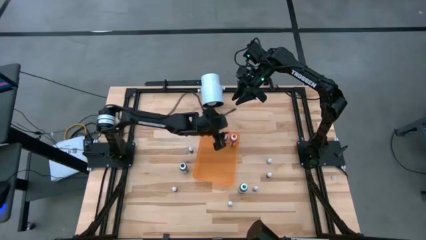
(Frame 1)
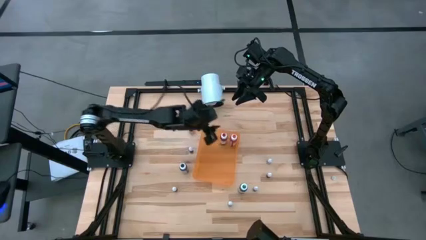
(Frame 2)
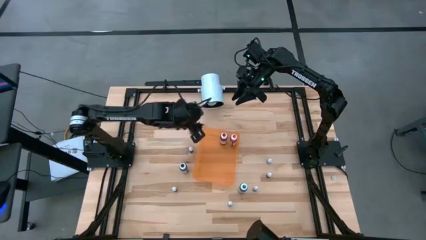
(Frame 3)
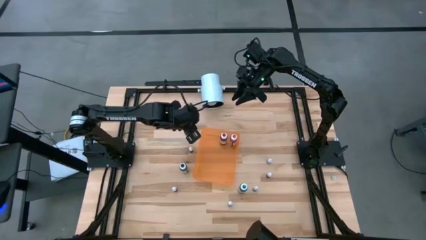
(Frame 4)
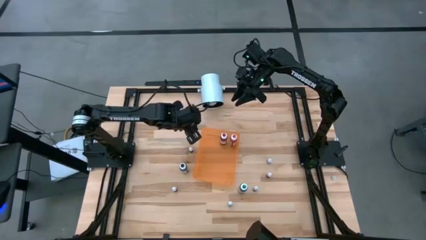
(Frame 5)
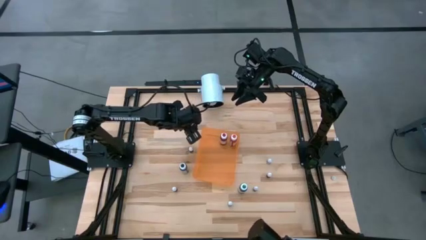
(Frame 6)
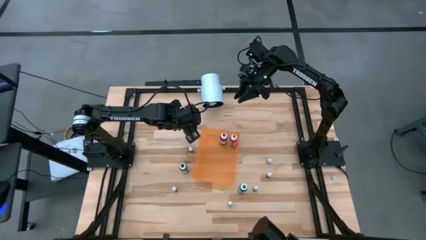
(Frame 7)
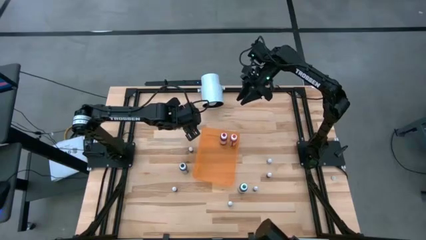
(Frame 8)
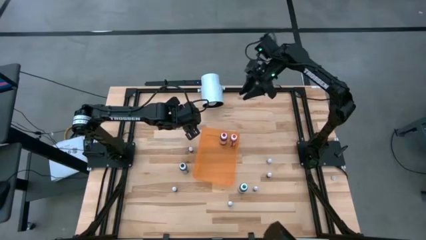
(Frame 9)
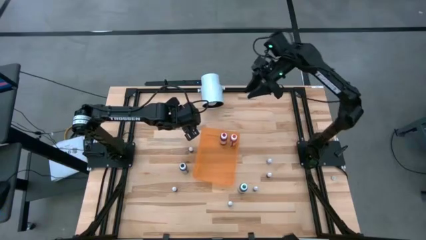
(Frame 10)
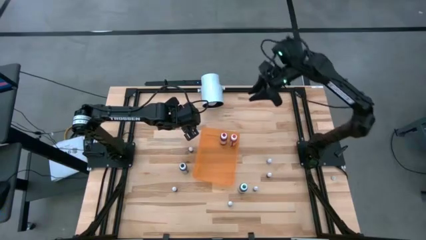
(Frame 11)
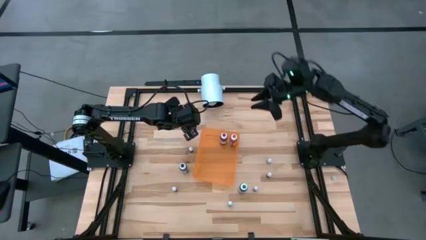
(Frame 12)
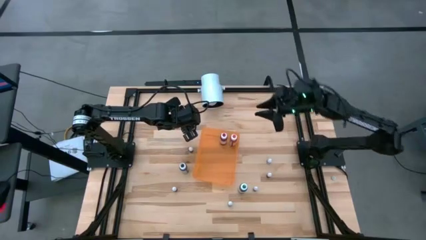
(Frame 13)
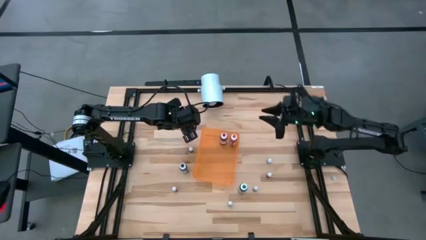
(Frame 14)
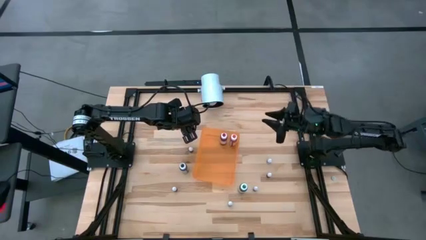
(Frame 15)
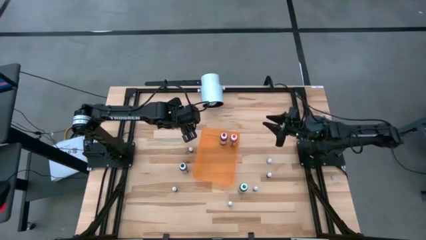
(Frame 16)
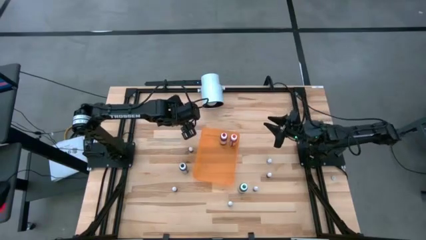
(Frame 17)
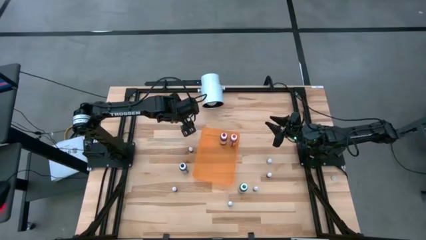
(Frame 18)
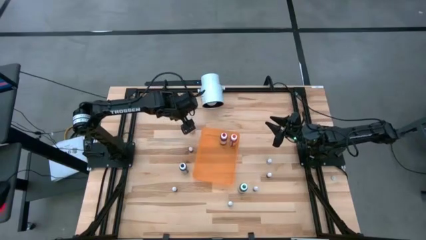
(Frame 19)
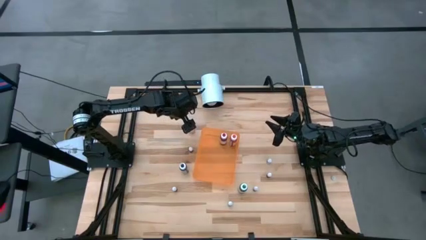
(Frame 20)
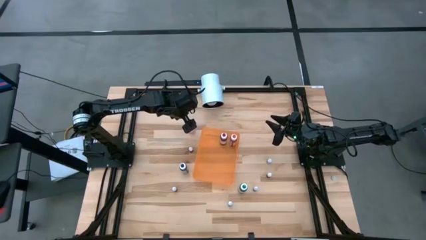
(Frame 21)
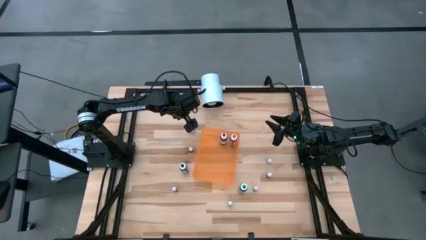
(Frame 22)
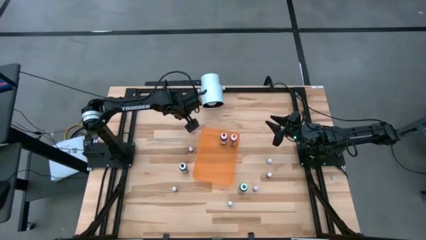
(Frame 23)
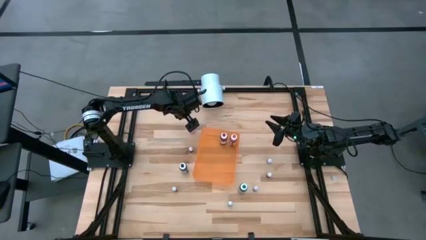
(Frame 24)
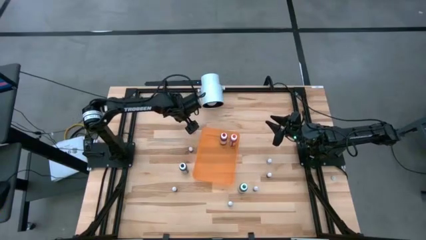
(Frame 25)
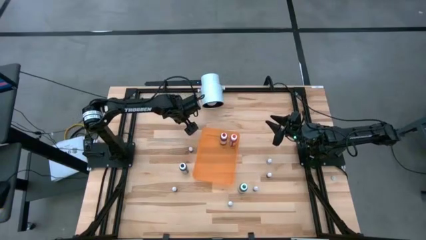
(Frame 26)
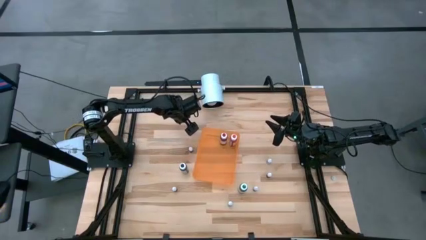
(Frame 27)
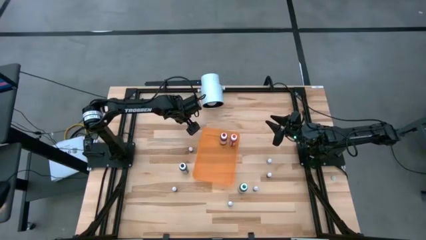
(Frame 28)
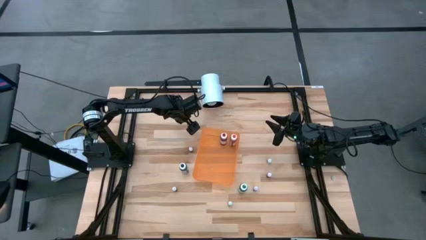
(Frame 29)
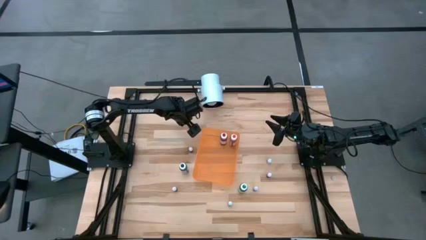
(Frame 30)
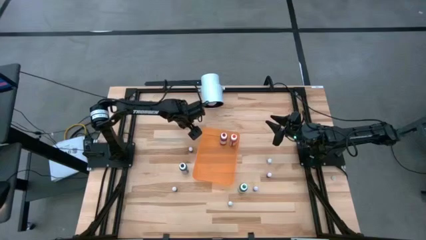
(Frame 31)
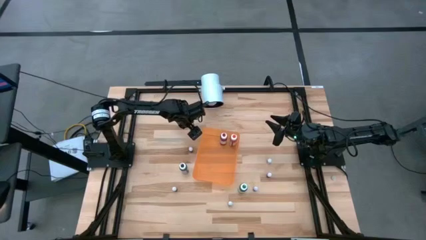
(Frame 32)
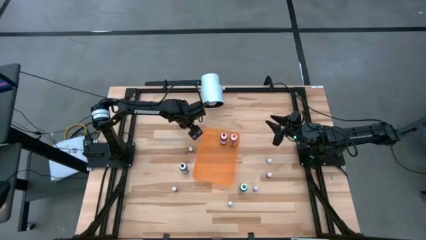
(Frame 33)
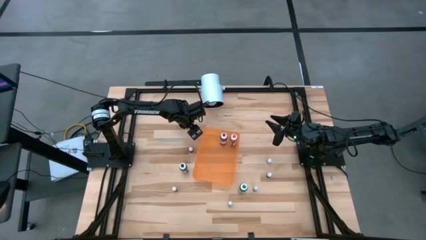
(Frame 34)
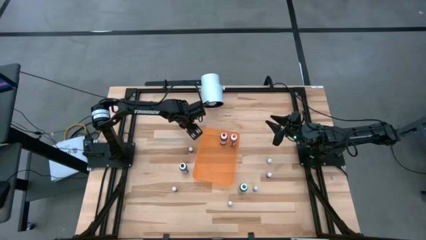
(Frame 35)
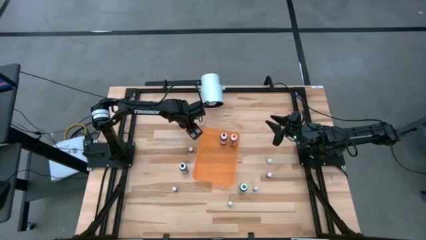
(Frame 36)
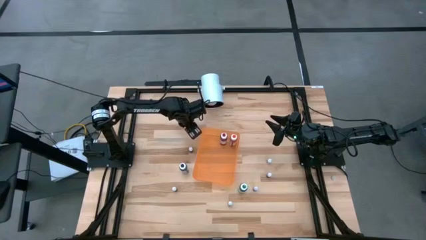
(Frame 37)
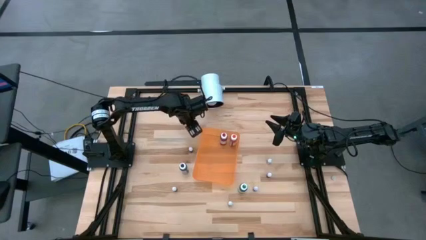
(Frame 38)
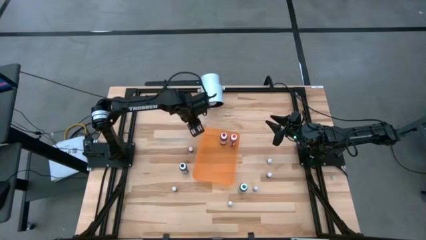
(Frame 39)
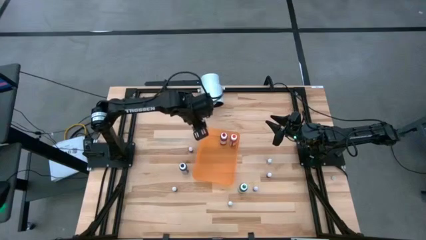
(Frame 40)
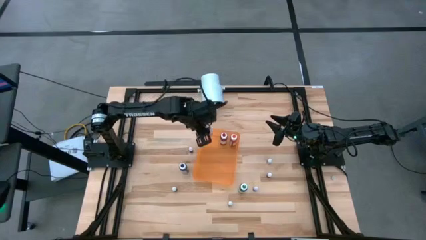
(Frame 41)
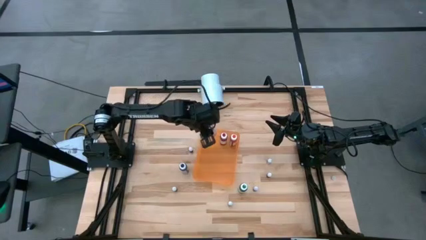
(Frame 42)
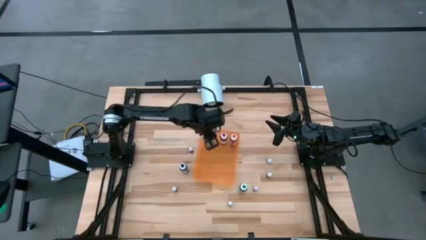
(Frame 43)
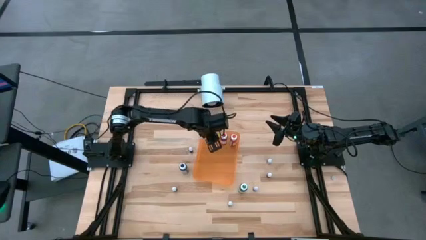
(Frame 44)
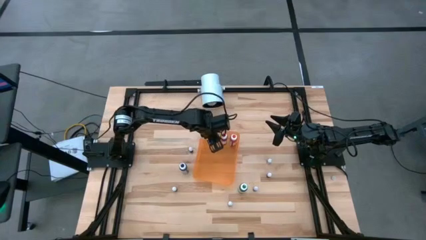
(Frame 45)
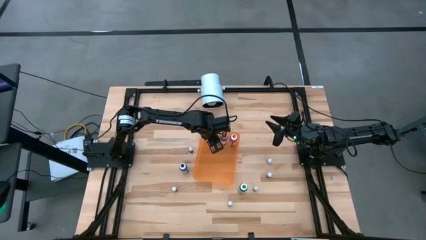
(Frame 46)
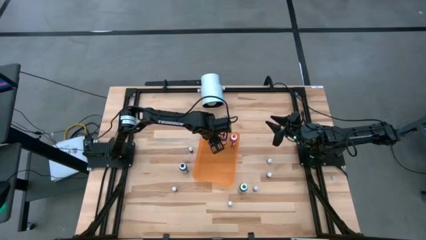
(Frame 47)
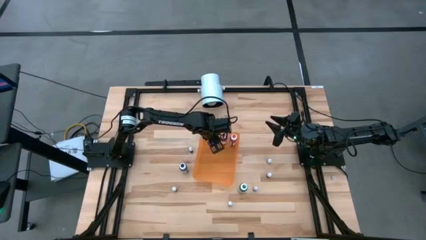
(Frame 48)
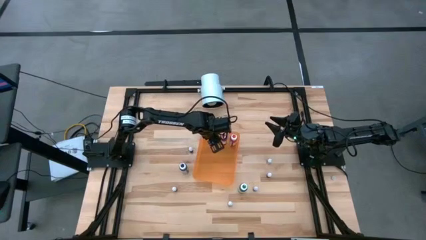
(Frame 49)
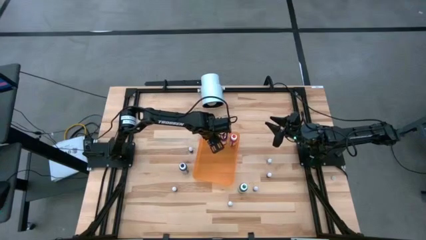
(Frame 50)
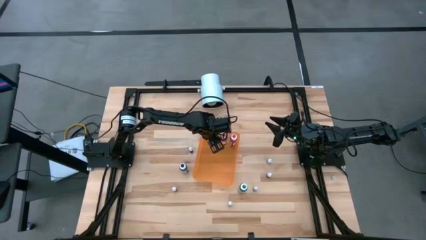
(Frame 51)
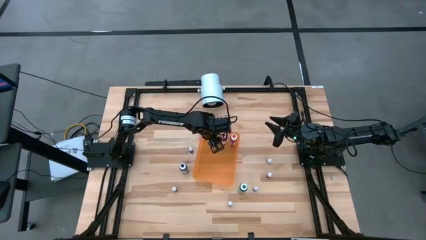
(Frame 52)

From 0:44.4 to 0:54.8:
Task: Pick & Place food coloring
Put the large pink food coloring bottle into the orange bin

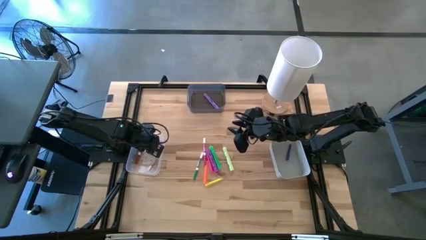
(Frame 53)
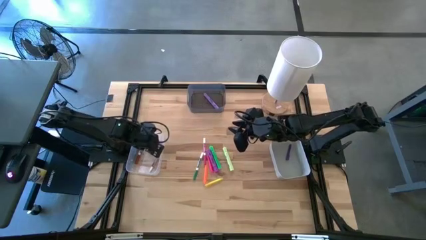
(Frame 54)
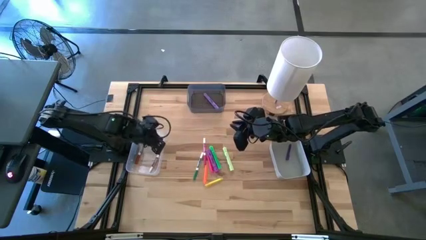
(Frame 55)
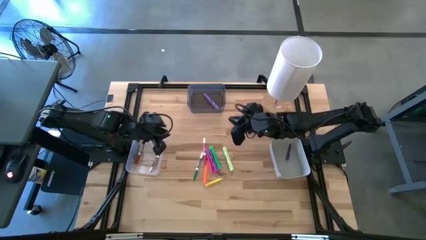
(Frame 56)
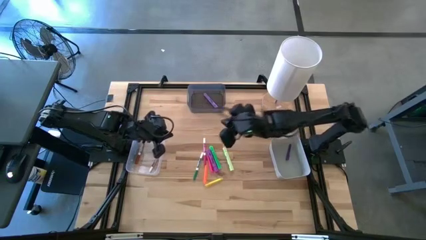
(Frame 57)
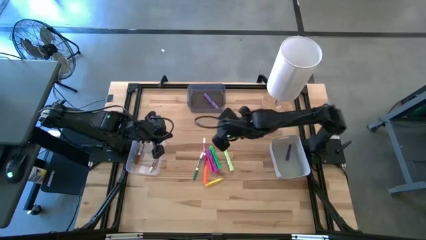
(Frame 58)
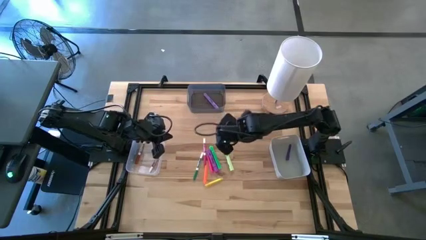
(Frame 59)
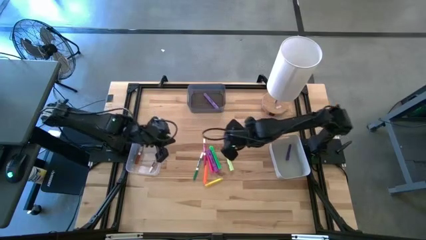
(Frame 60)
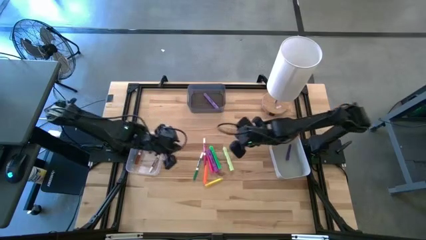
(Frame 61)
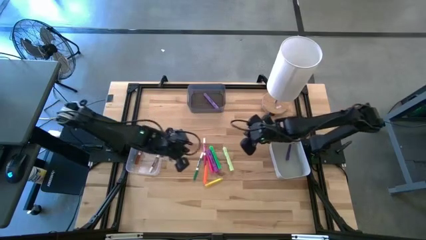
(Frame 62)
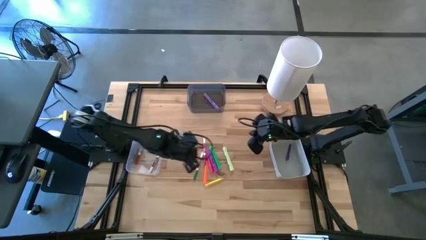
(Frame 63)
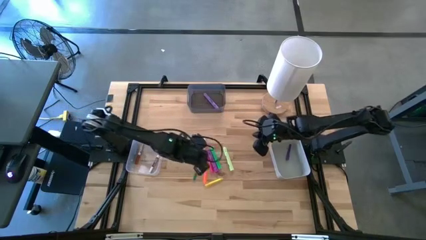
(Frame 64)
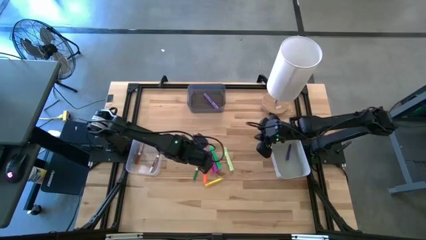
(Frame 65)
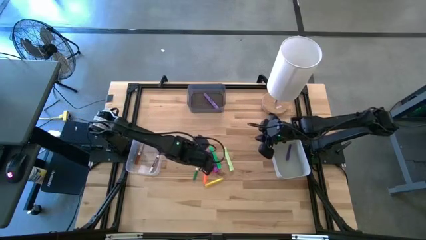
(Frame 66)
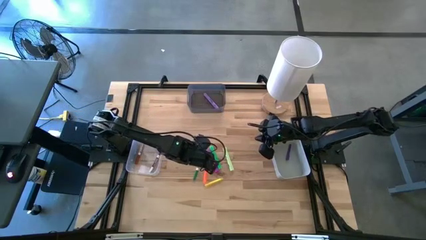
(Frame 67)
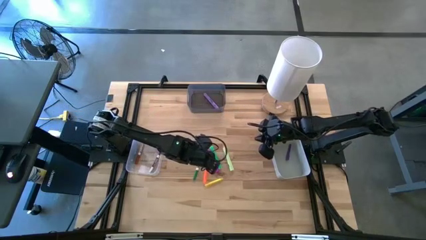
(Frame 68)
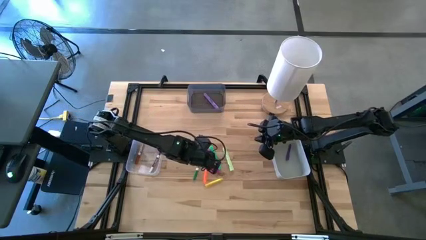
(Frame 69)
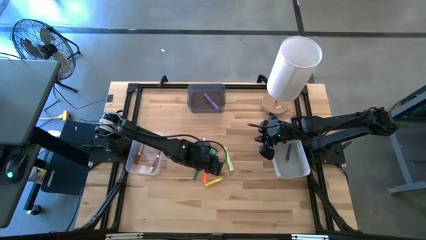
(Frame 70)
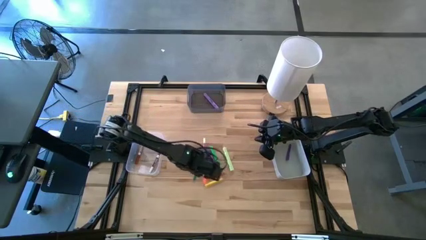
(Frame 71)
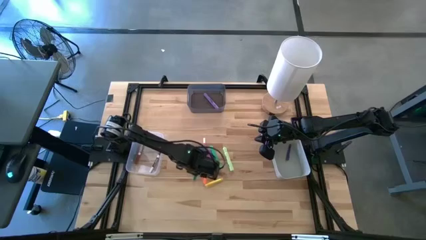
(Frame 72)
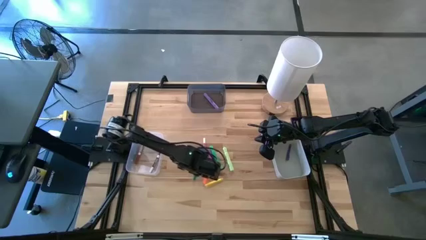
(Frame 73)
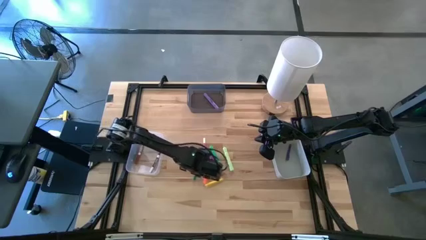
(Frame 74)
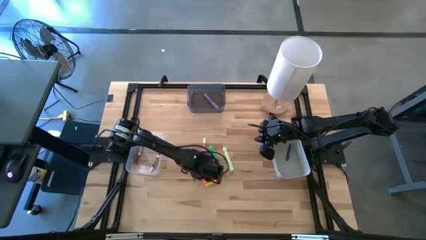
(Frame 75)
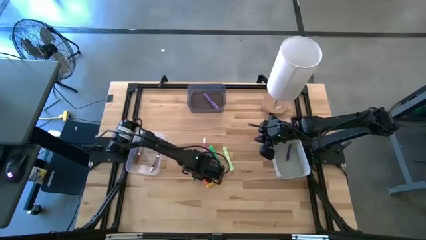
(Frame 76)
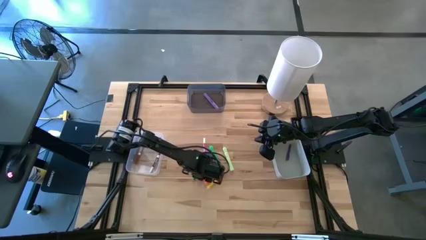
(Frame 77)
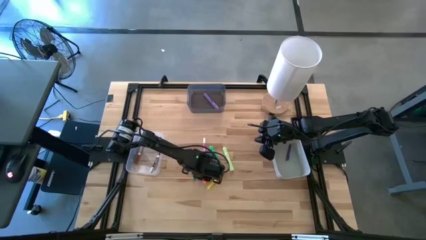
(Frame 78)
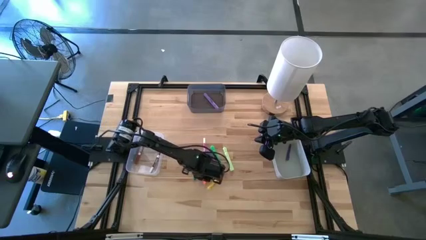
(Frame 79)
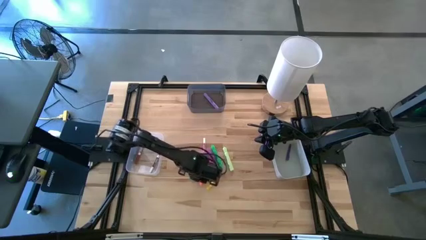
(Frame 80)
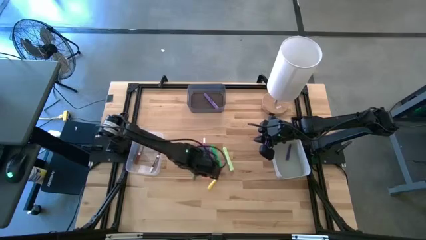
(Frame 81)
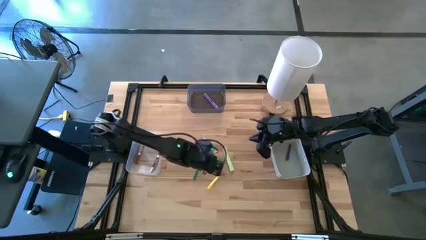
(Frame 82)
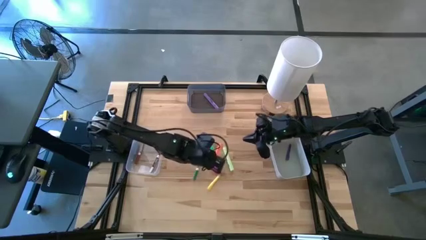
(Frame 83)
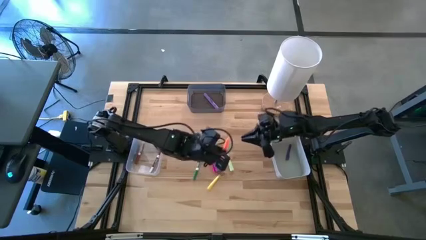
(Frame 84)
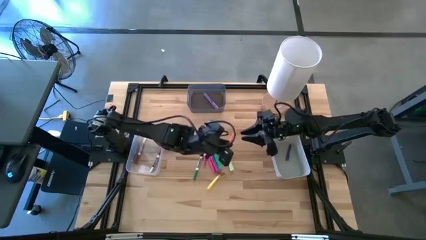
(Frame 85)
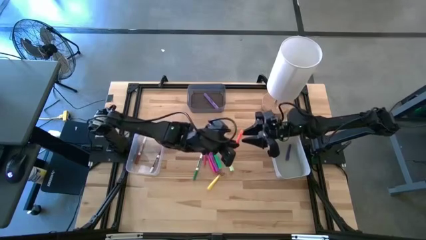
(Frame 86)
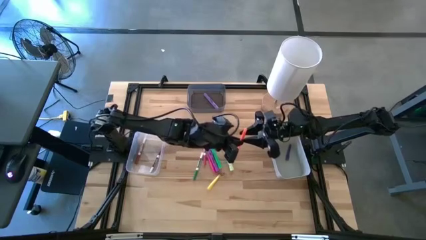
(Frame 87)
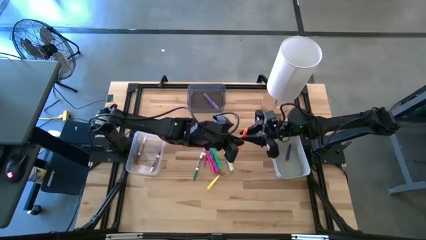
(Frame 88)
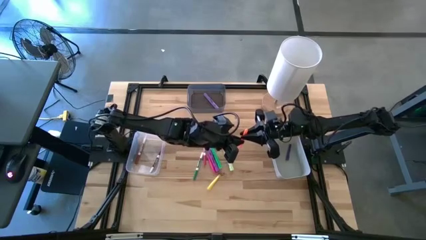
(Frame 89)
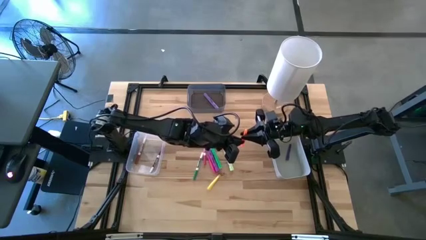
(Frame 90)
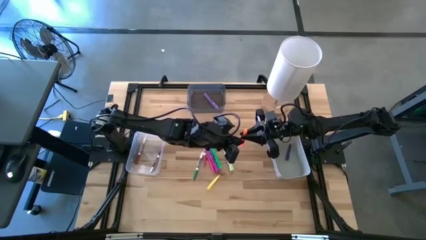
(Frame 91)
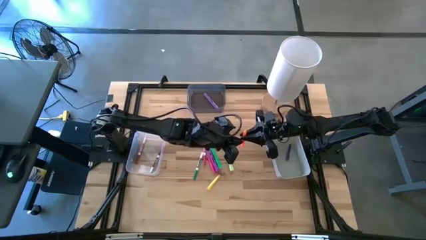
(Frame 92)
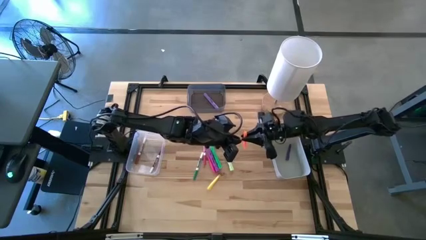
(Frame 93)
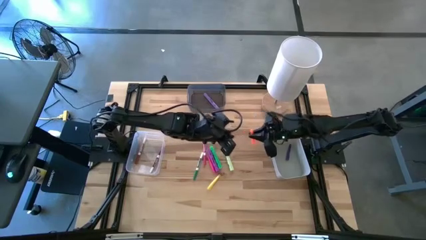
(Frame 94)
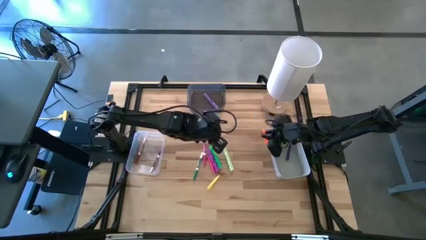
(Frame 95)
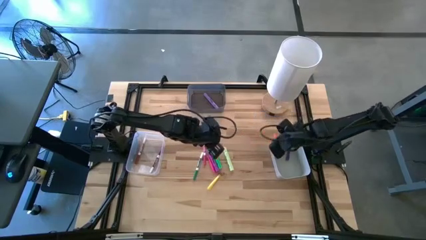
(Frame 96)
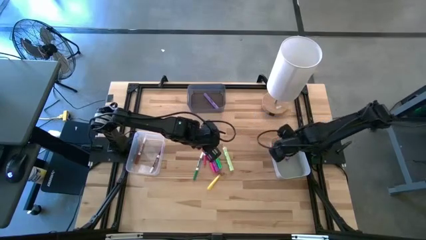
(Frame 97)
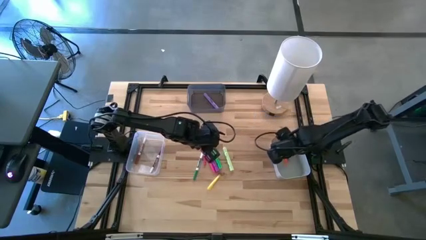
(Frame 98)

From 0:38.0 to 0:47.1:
Task: Pick & Place Markers
Put the orange pen into the gray bin
